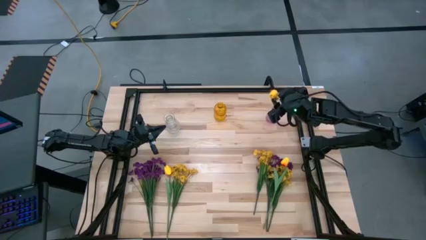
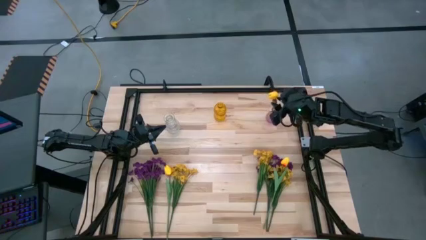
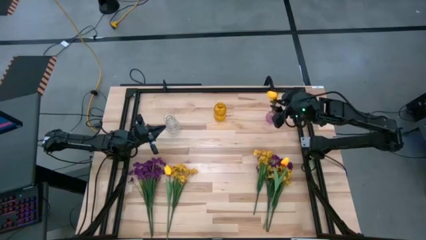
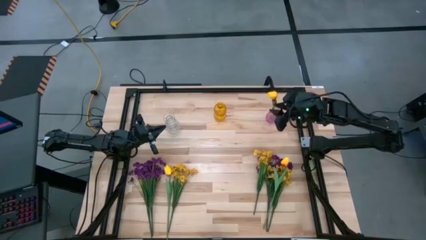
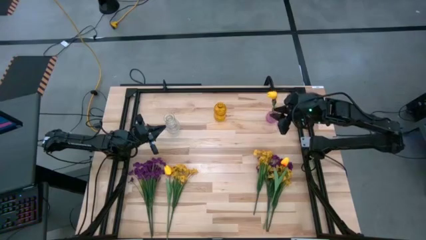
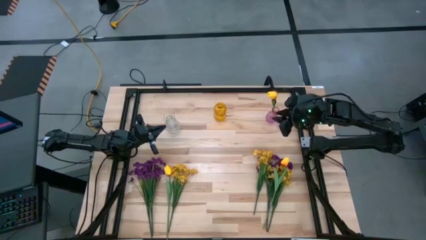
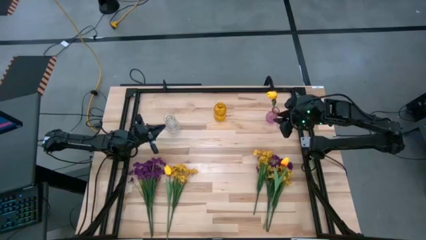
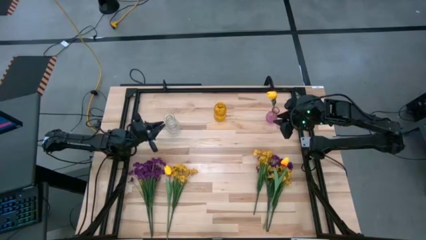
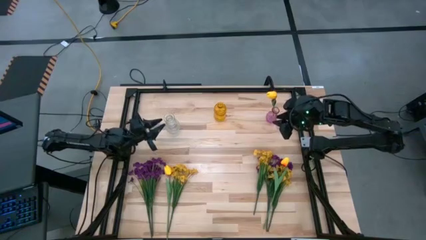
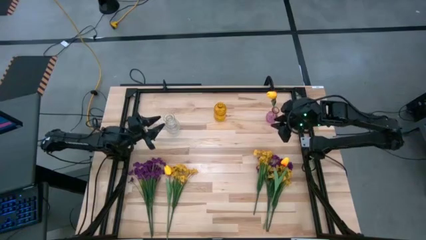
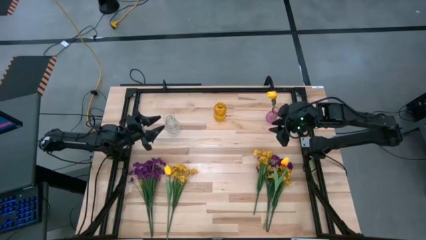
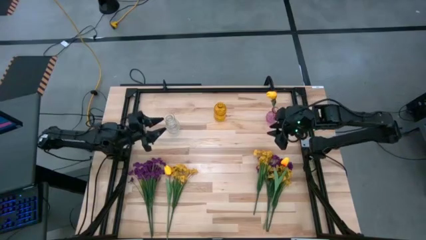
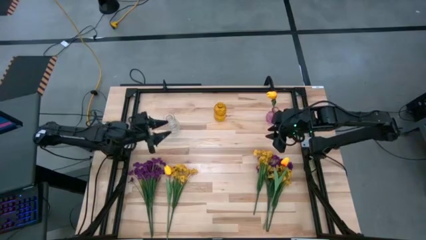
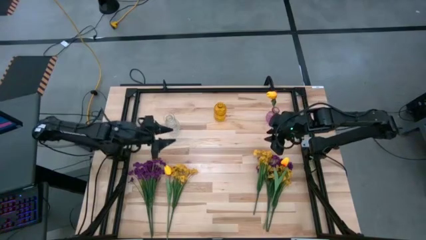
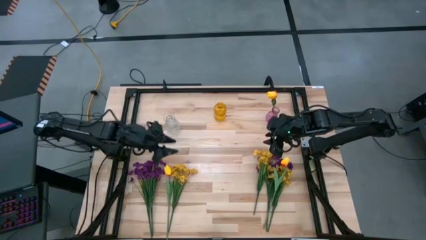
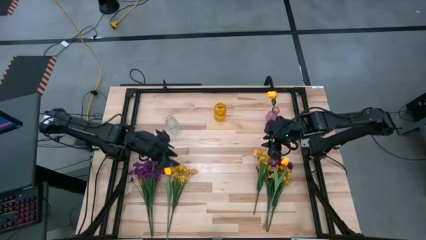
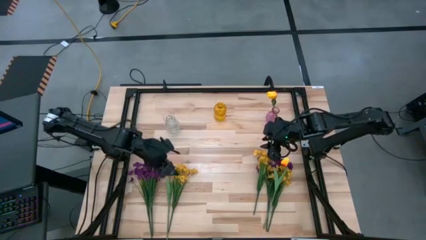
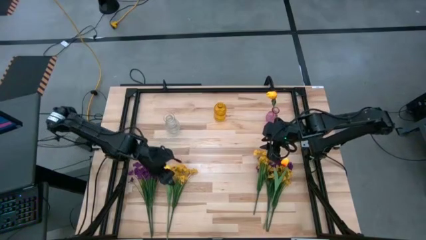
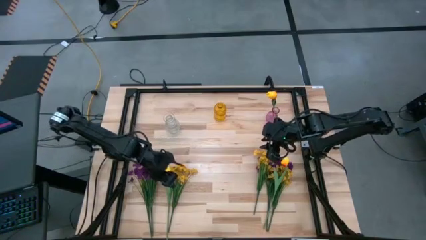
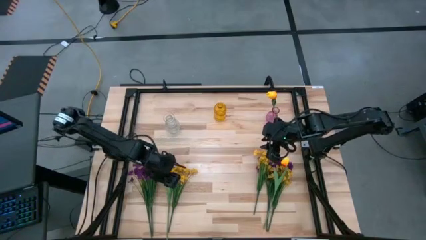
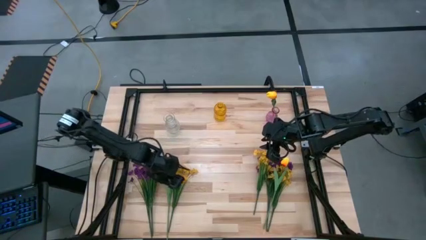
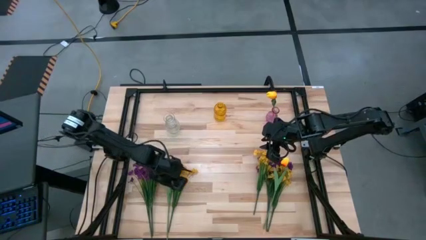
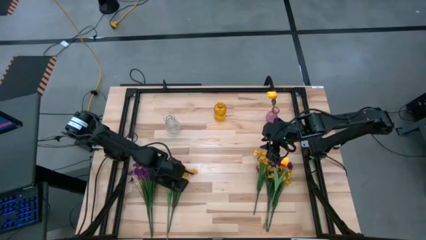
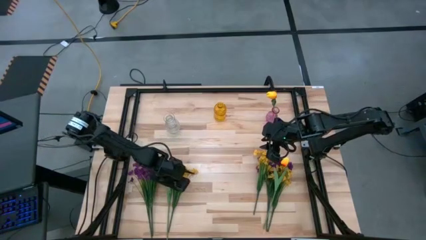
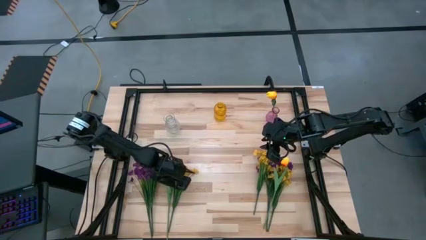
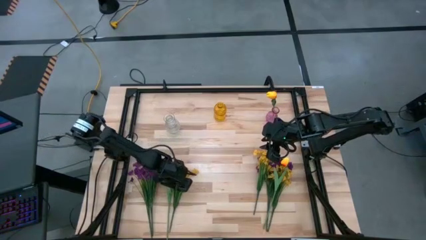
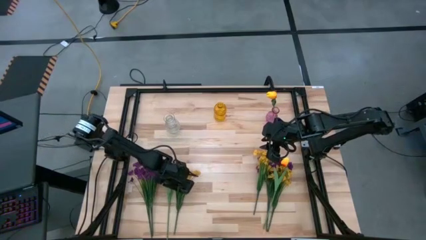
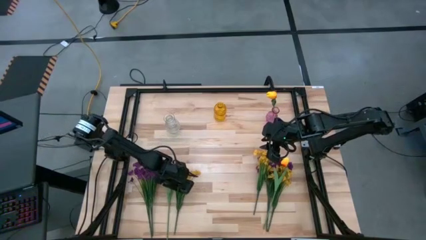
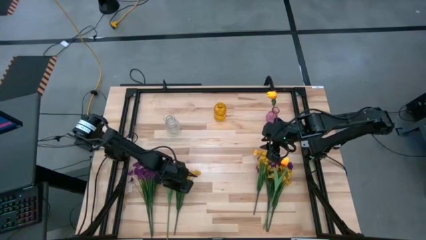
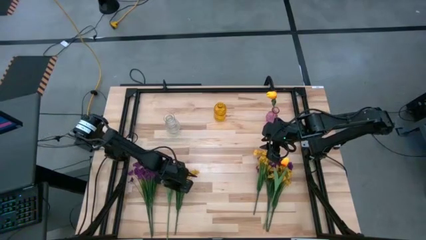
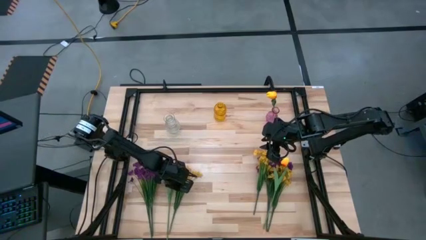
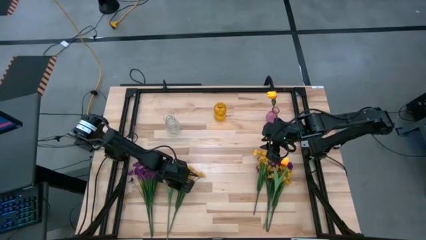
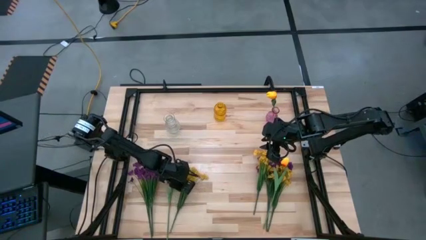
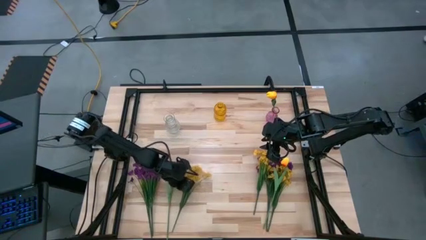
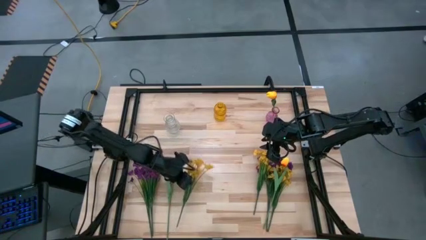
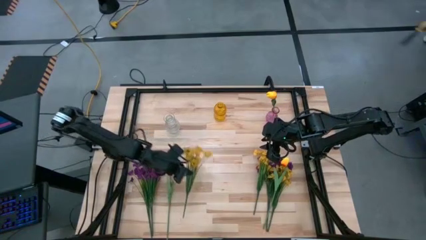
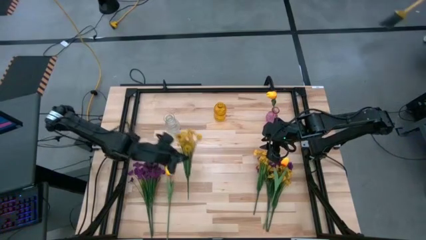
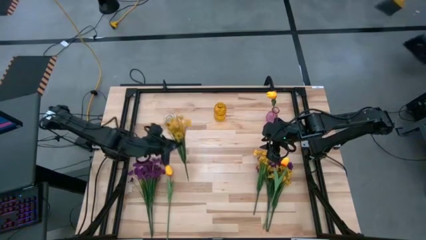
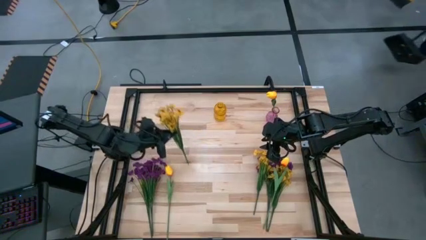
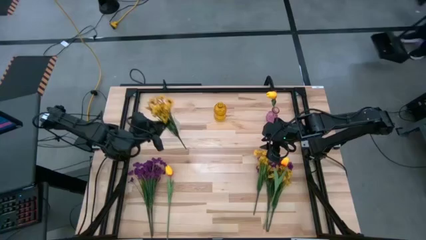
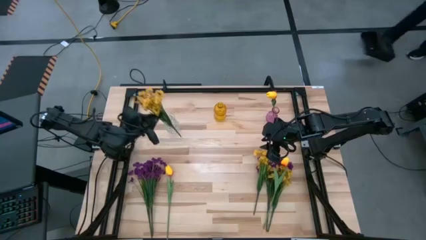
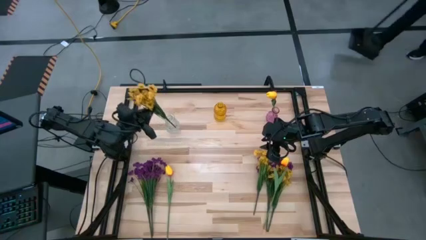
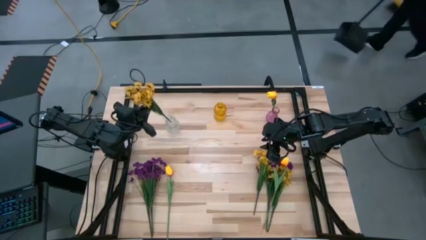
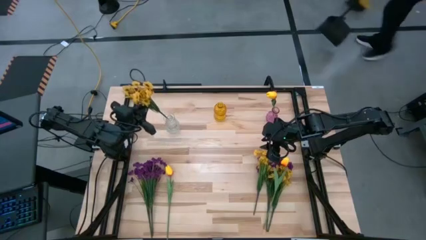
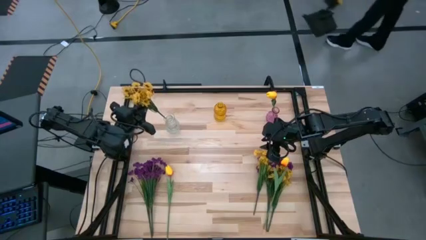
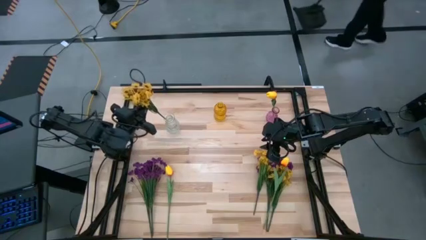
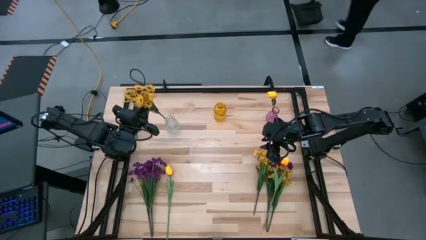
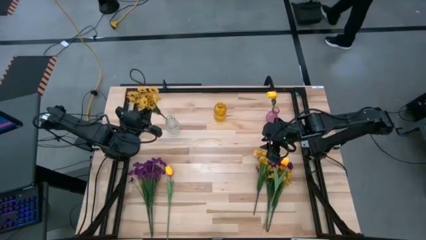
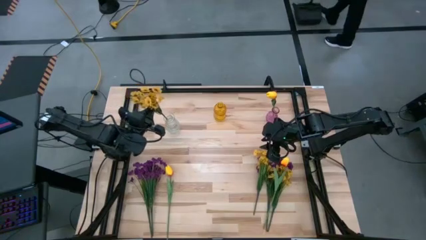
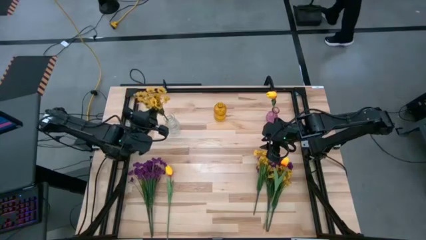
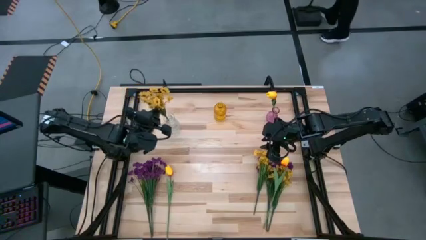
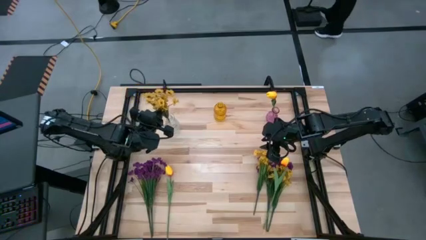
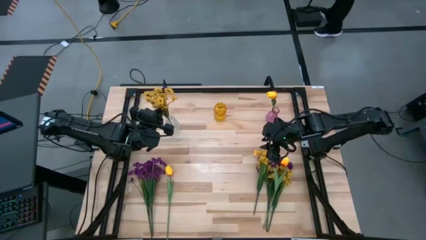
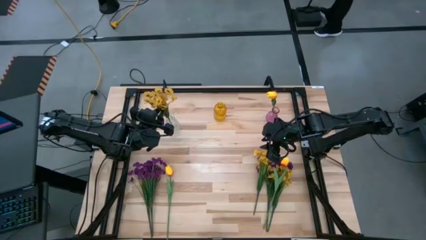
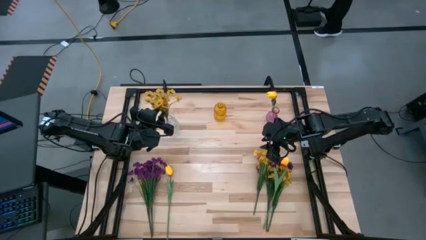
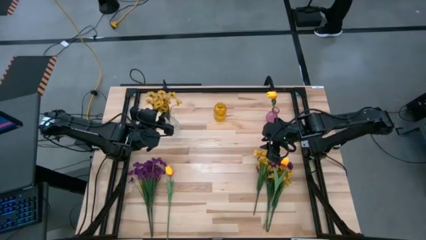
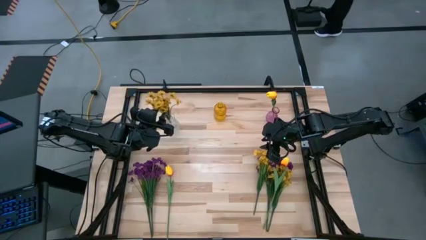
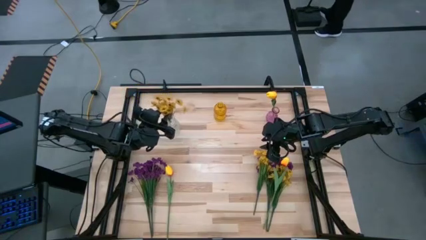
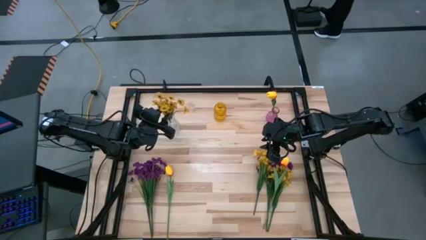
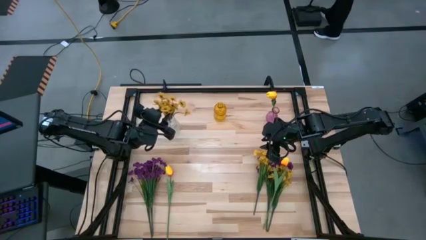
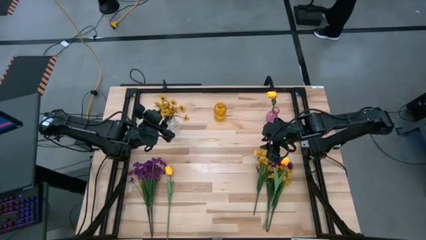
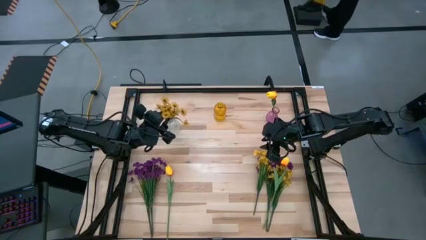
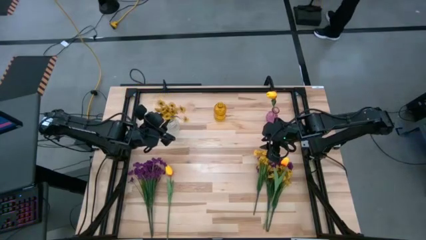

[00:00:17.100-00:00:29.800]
Task: Sort flowers into vase by color
Put the left yellow flowers into the transparent vase

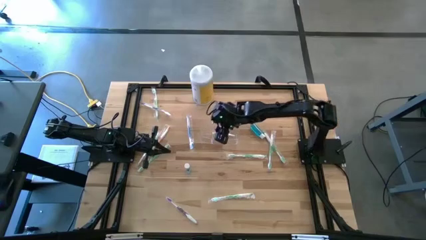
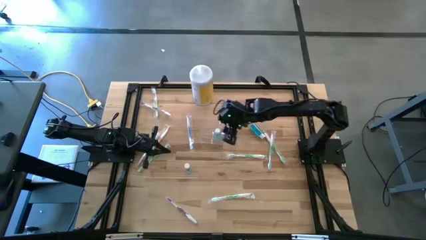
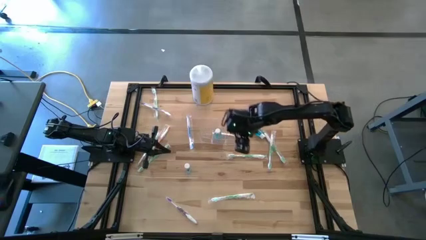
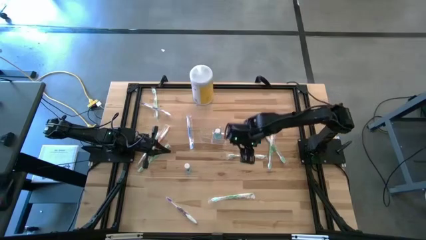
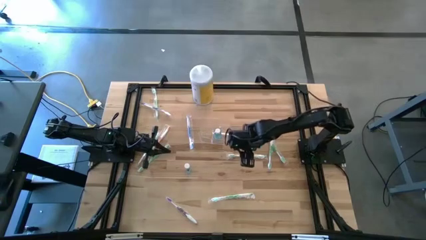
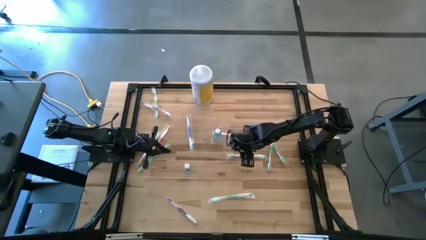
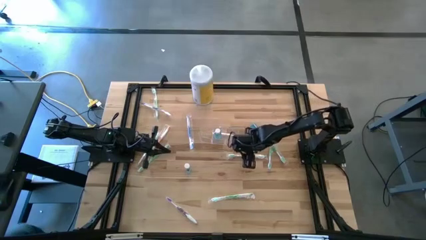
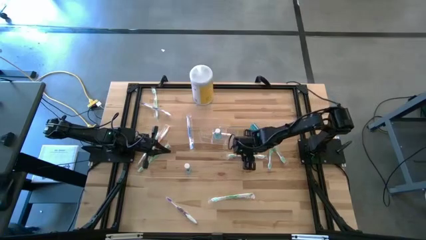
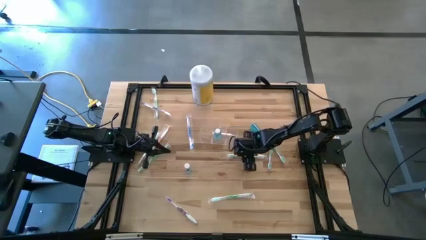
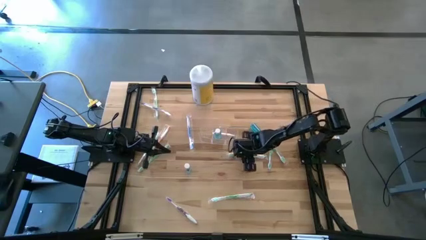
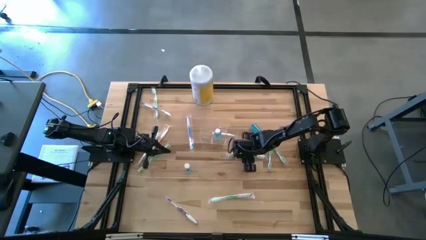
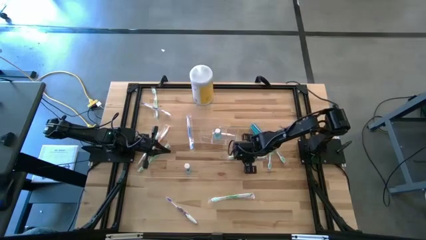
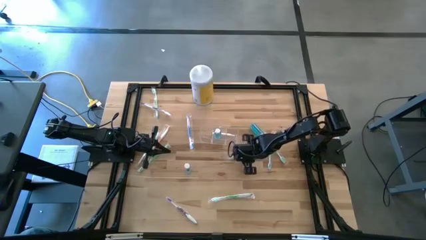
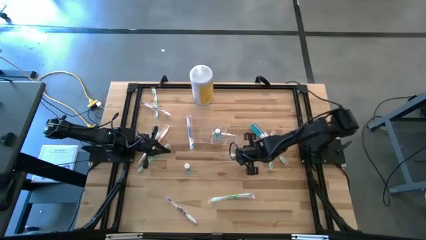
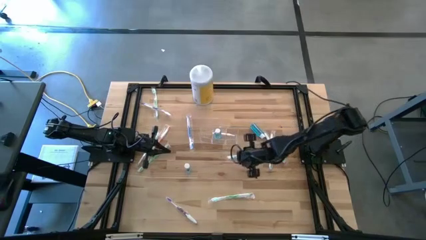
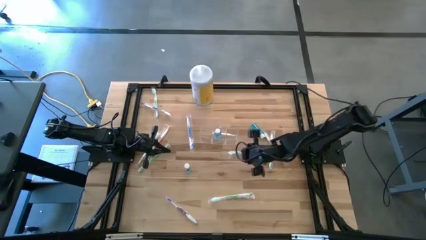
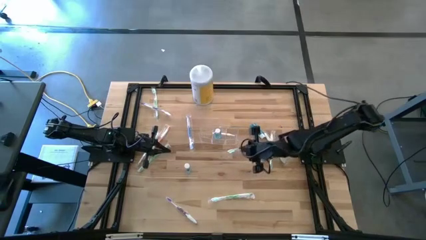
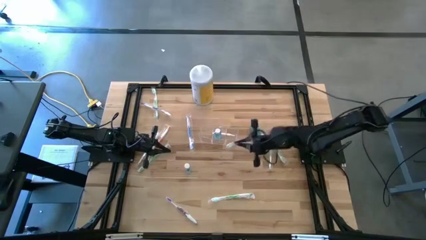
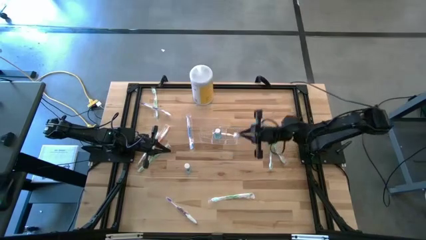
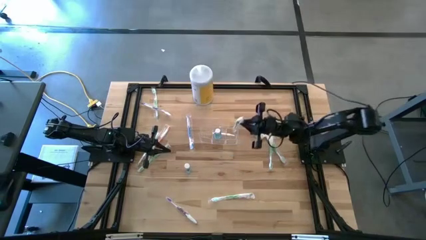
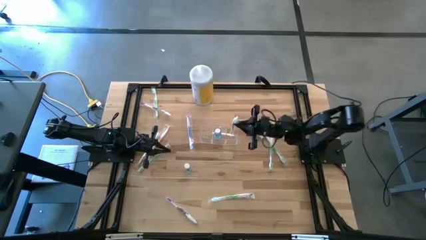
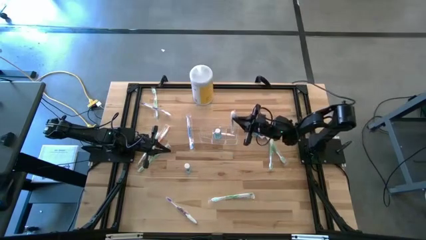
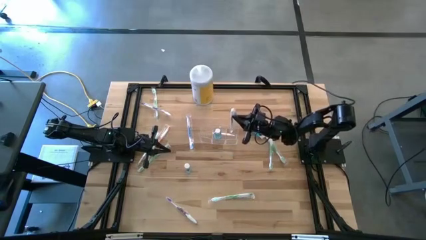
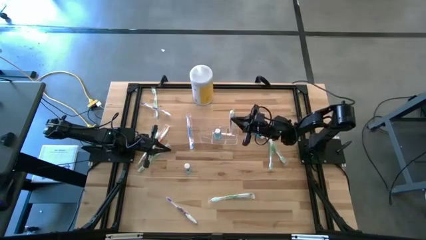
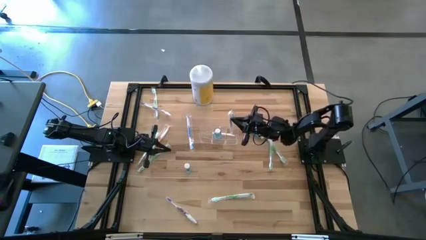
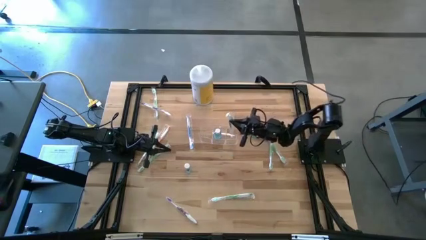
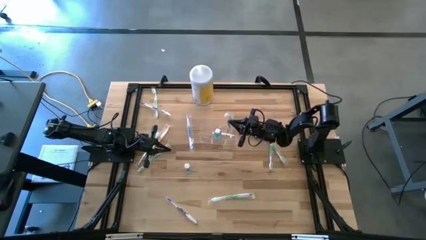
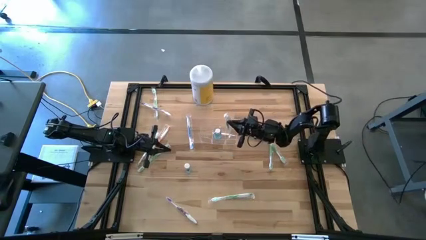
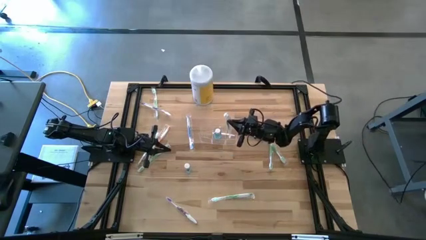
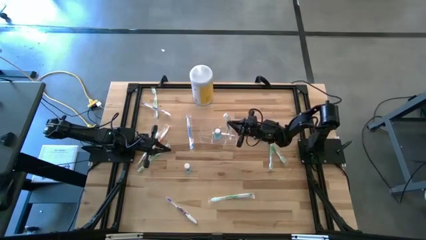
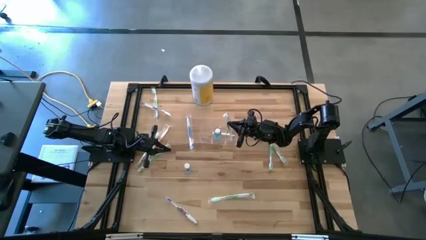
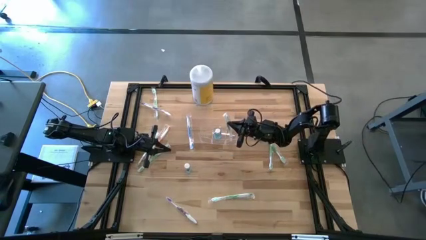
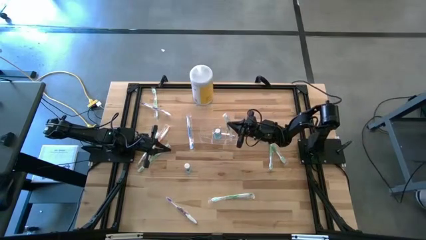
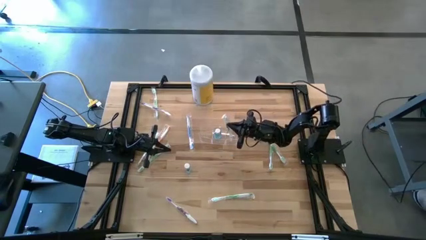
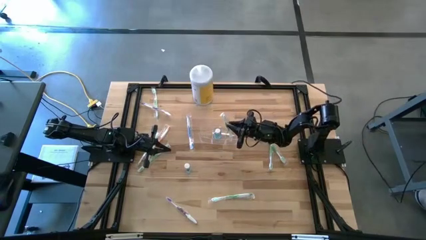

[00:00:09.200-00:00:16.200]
Task: Pick & Place toothbrushing station
Put the green toothbrush into the right section of the transparent organizer
